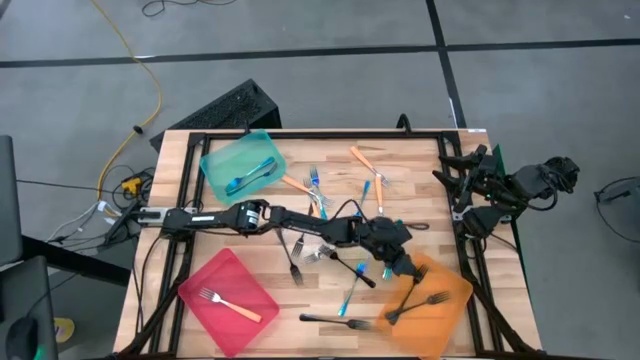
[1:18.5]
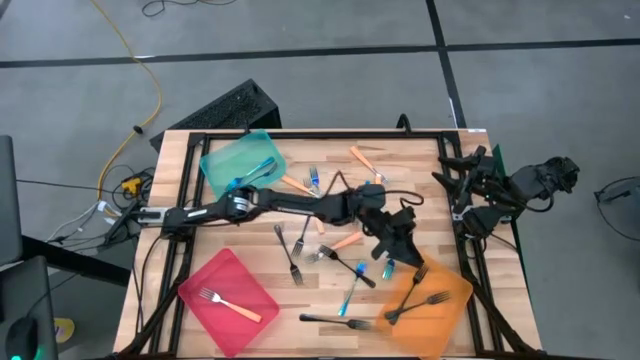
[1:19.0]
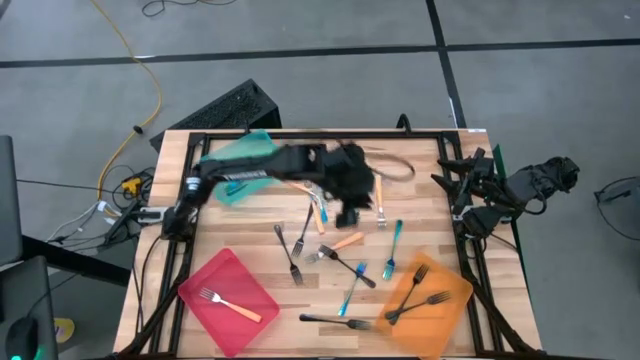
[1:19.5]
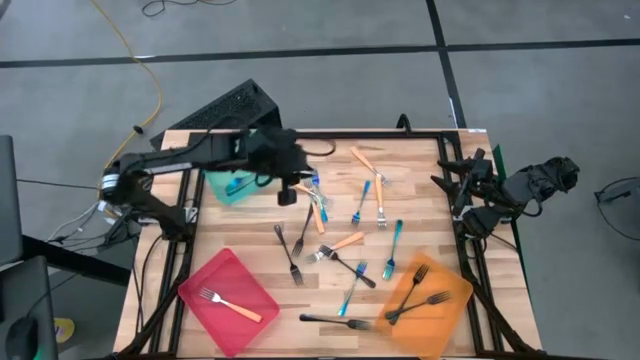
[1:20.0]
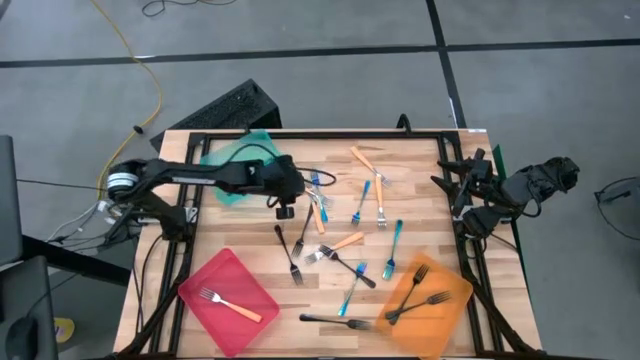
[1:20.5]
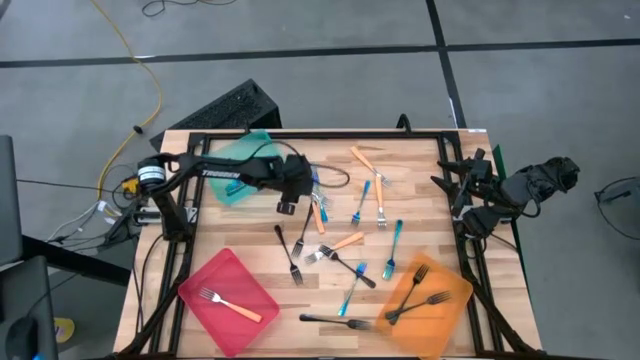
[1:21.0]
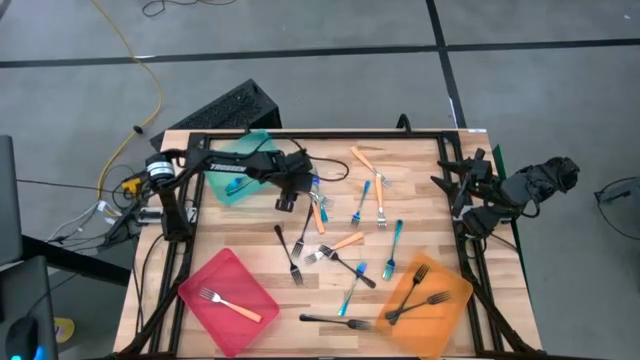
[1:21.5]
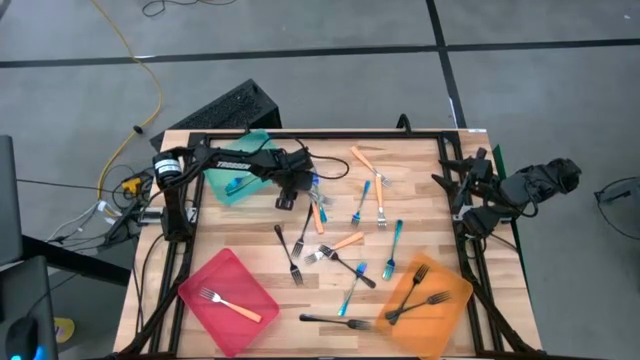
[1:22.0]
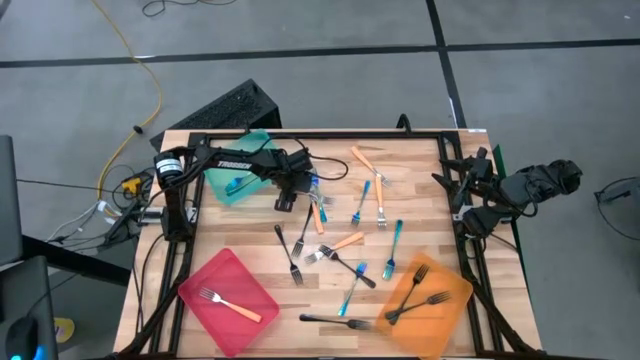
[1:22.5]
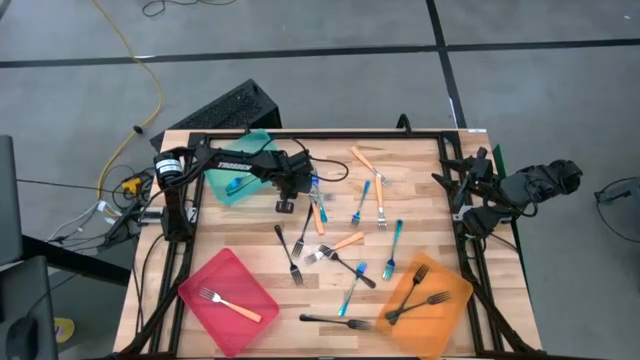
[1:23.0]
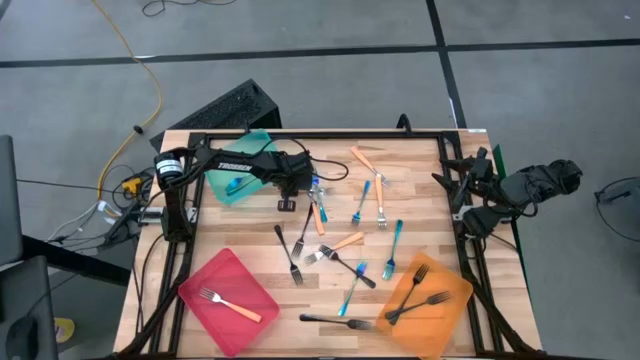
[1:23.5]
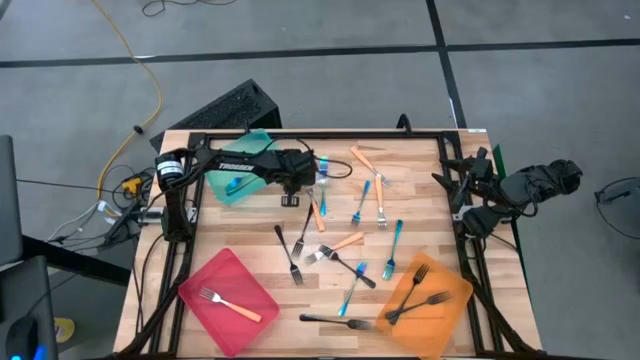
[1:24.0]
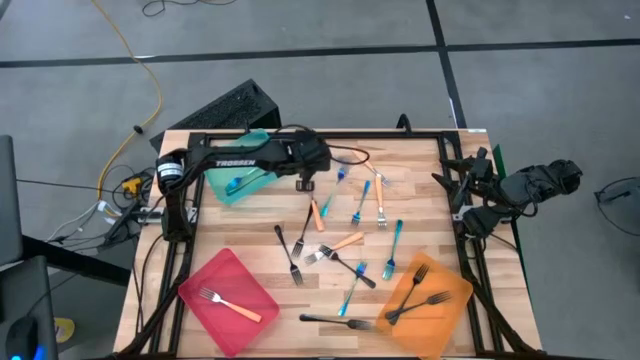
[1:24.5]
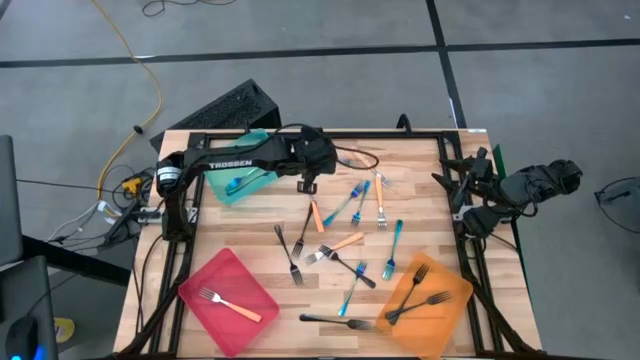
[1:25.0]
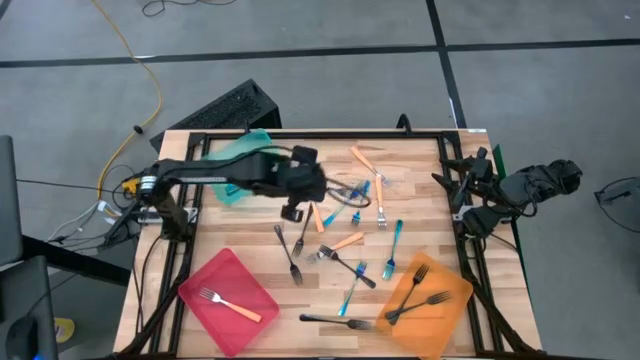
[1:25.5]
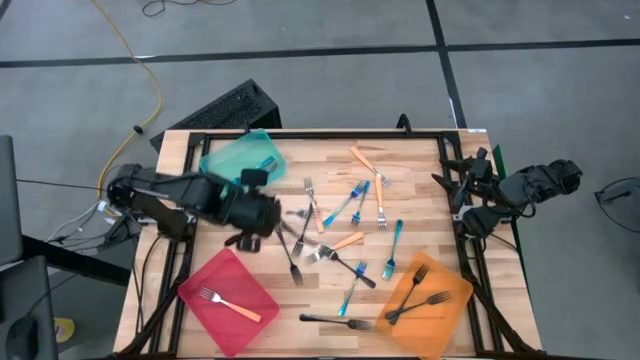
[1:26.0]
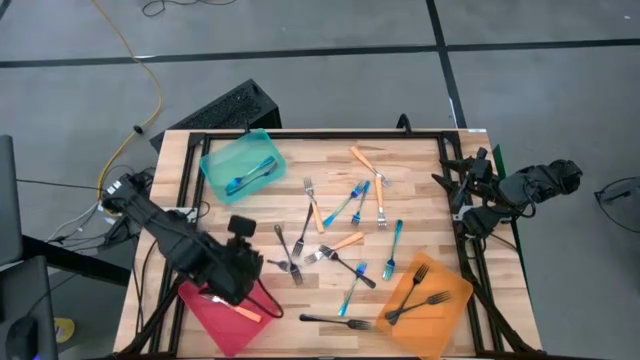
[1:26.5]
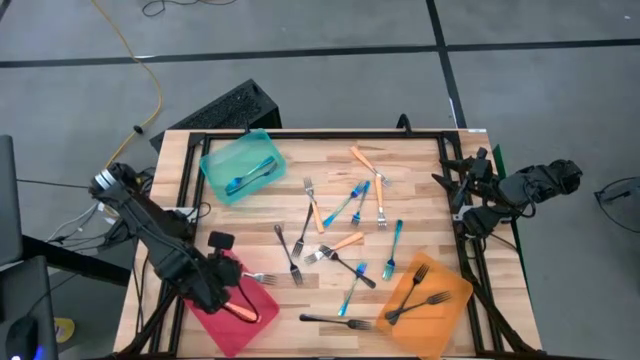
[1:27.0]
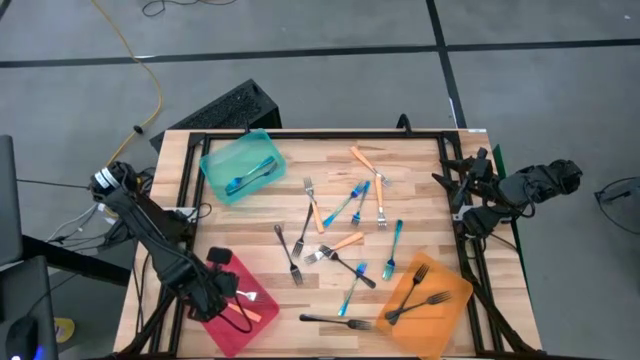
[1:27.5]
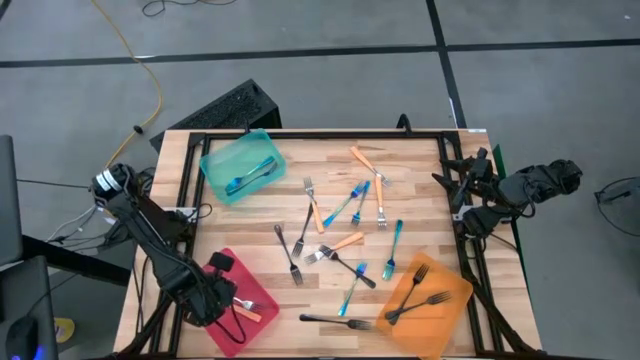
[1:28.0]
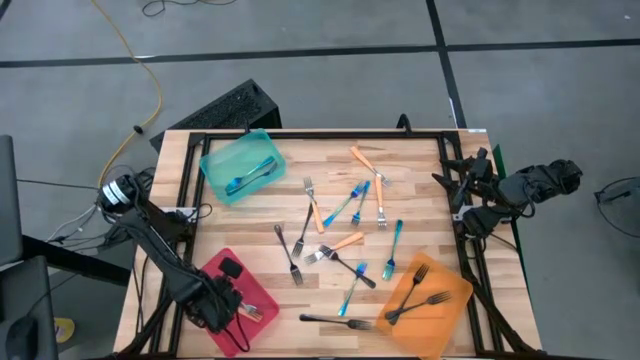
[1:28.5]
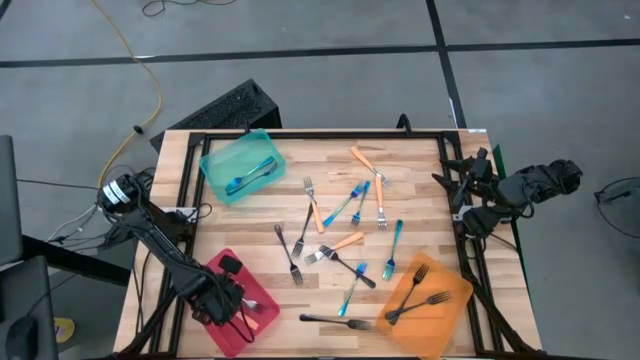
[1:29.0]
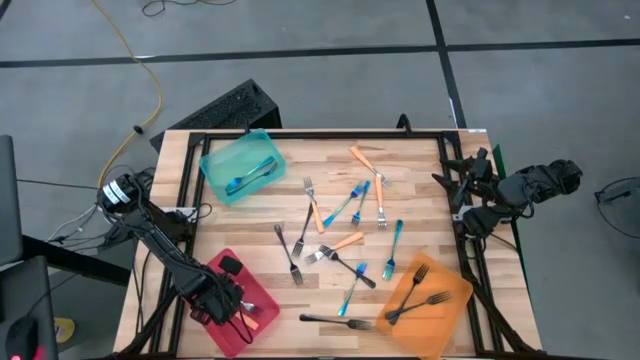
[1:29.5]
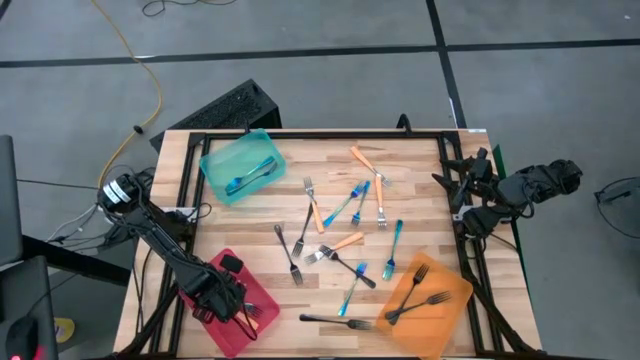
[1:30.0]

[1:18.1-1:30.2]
Task: Sort silverware by color (type)
Put the orange fork into the red bin

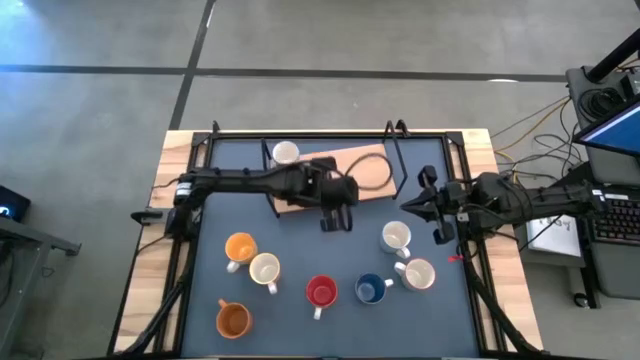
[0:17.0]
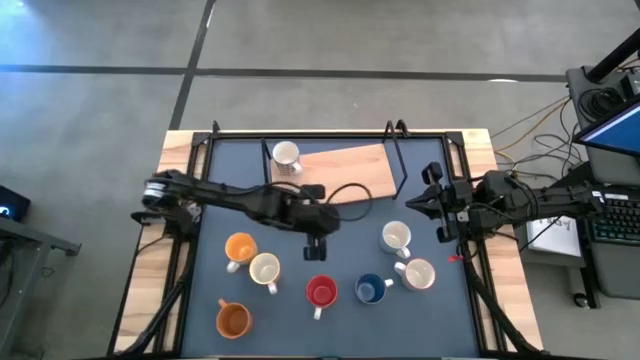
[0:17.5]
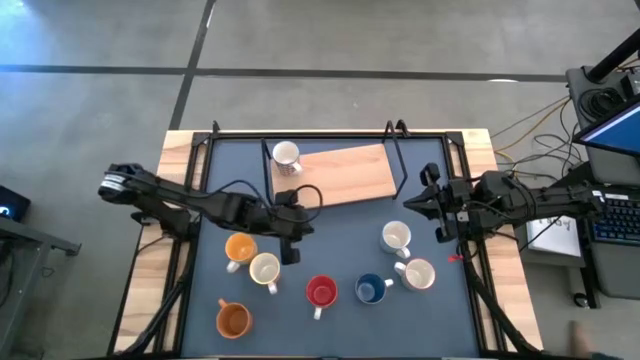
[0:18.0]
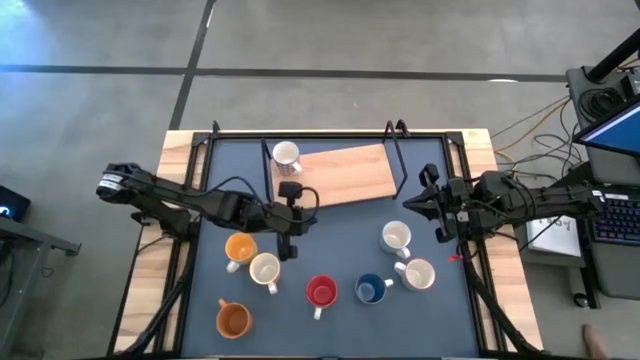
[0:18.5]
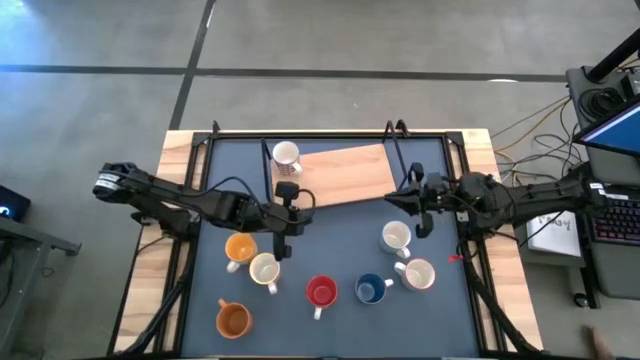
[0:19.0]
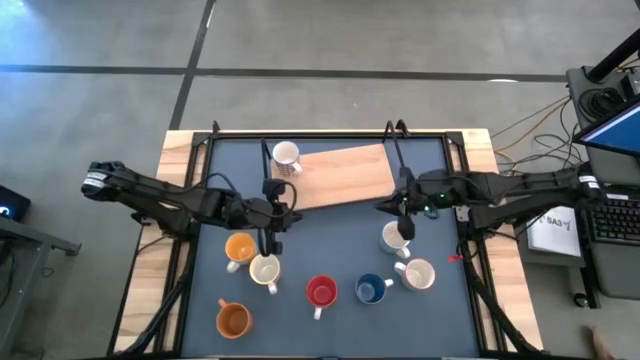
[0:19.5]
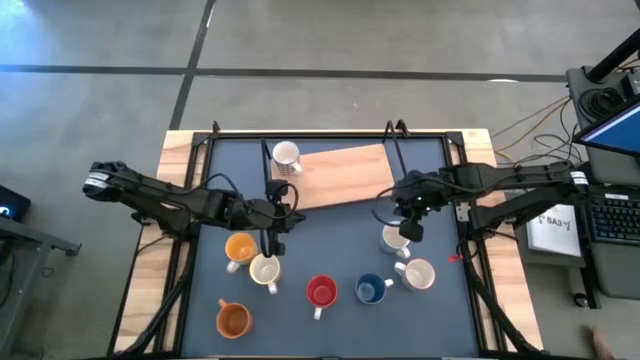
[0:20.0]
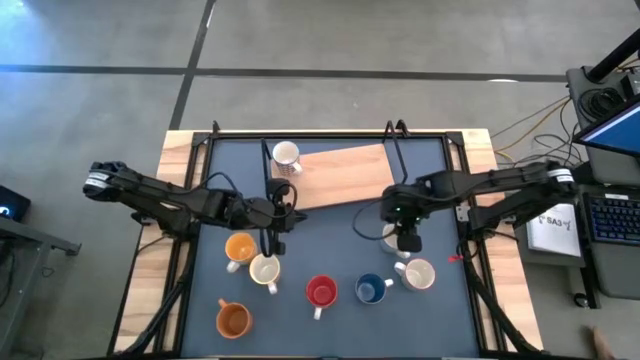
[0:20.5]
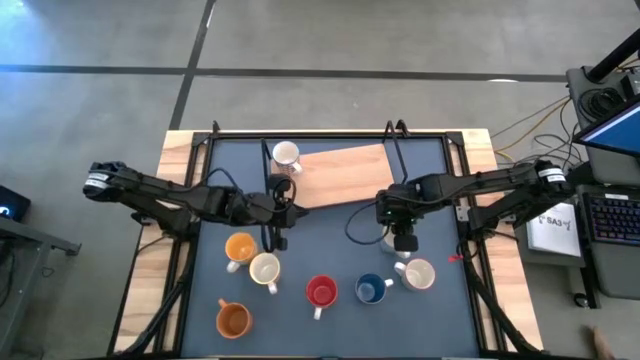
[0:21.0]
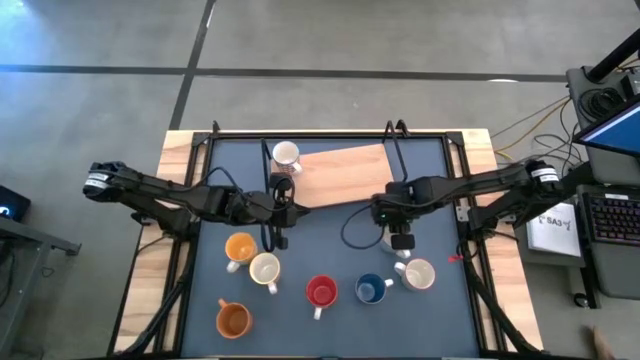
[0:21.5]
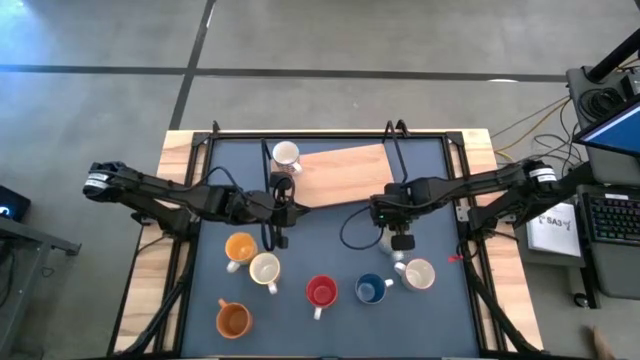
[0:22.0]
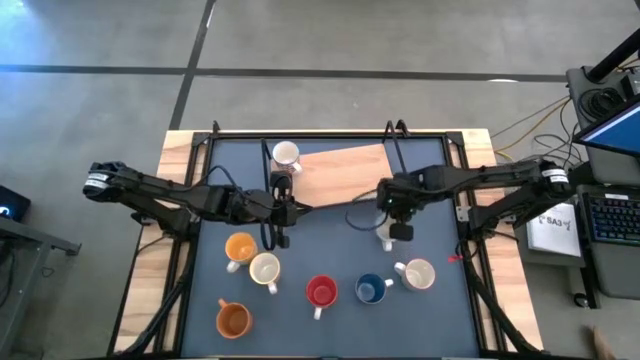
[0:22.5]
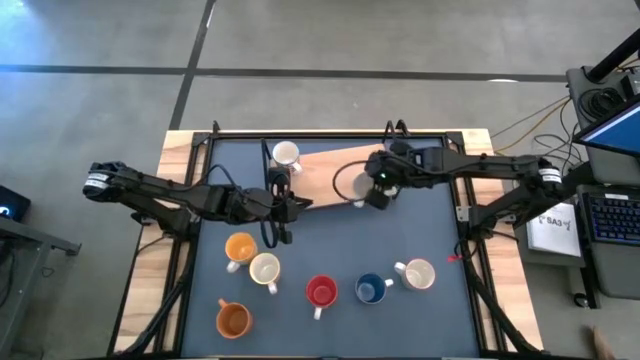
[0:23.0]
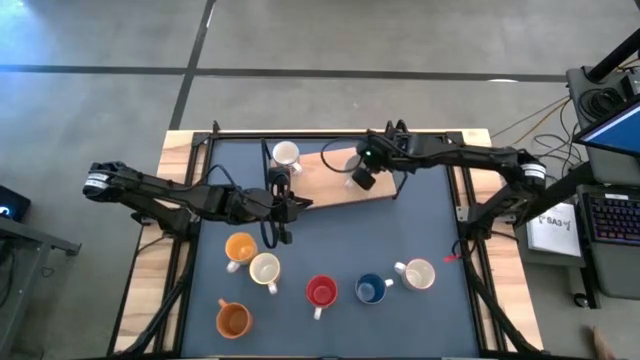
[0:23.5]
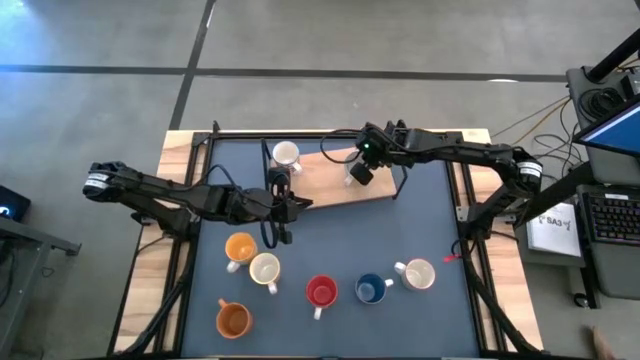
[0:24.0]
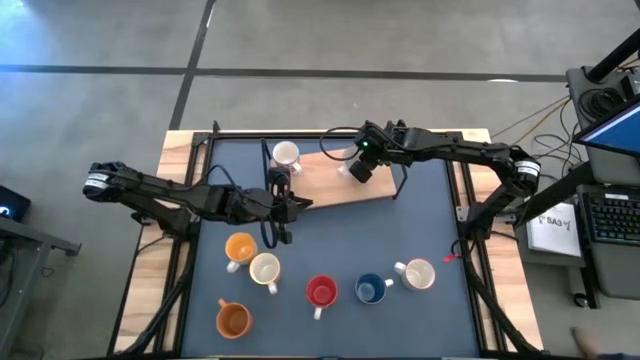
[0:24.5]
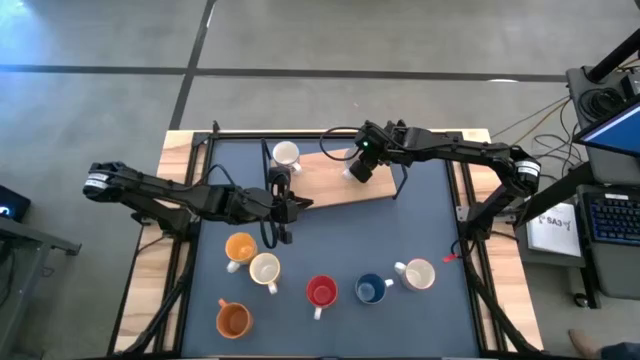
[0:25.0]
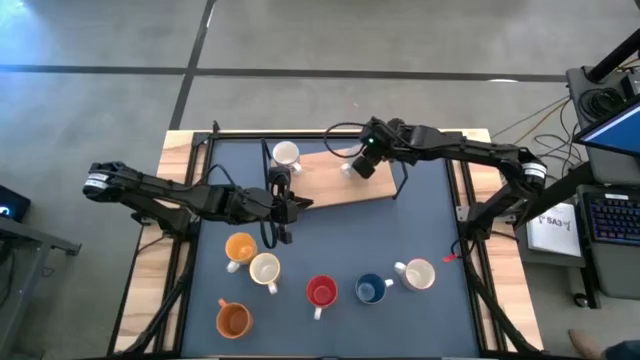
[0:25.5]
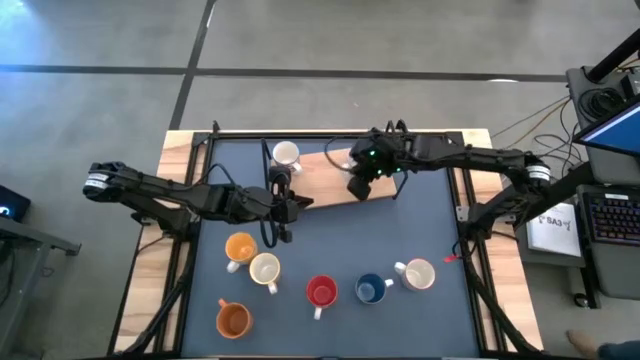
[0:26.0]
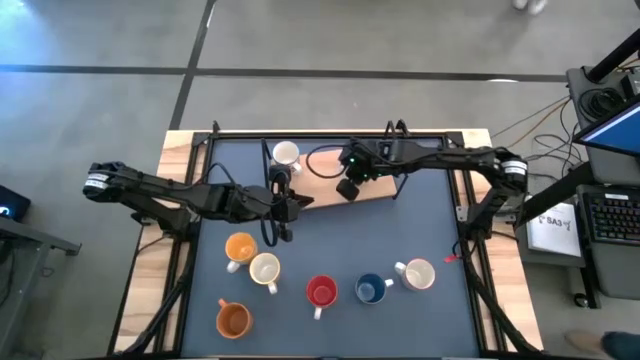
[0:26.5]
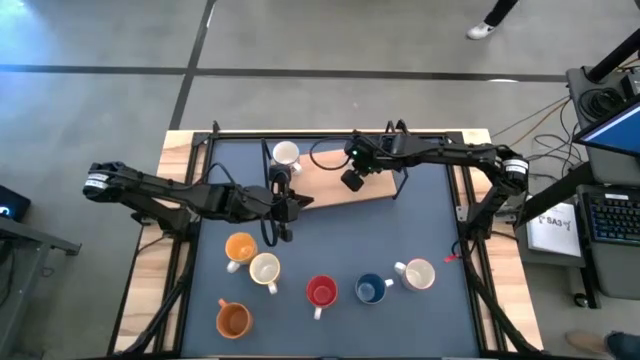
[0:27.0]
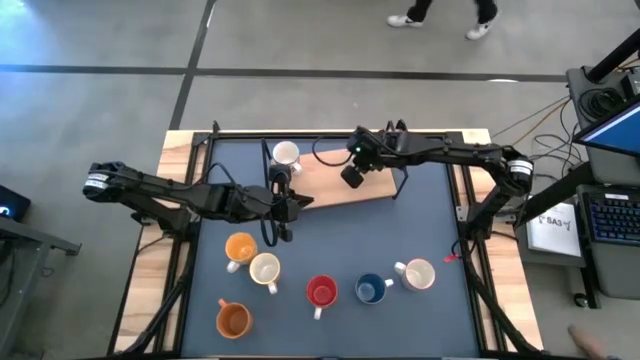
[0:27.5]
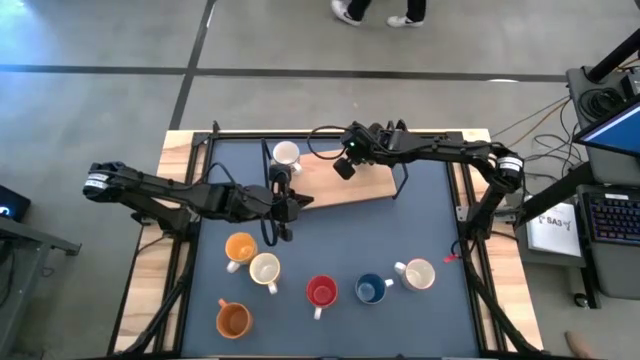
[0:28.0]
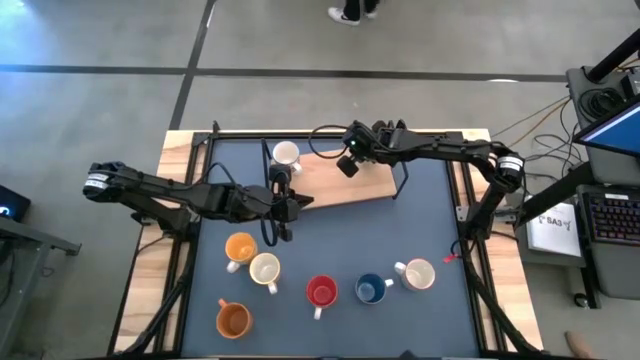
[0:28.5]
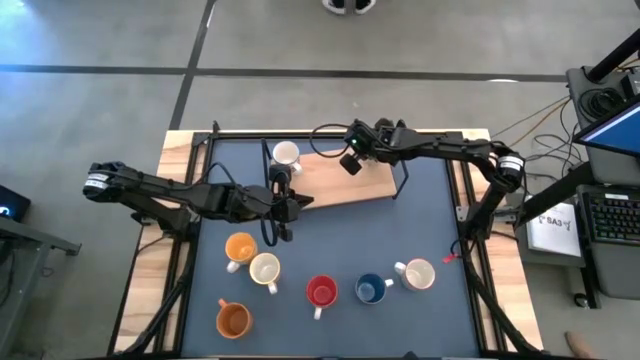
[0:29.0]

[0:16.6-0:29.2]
Task: Place coffee mugs
Put the blue patterned mug on the shelf
